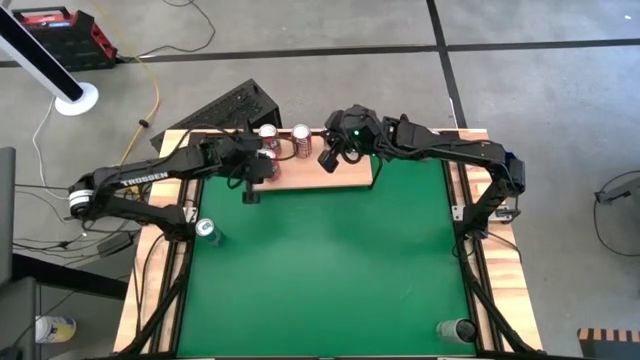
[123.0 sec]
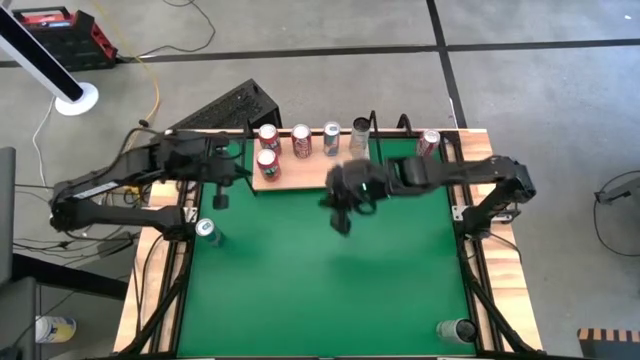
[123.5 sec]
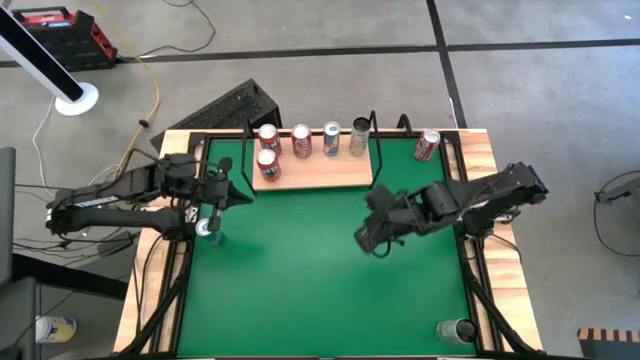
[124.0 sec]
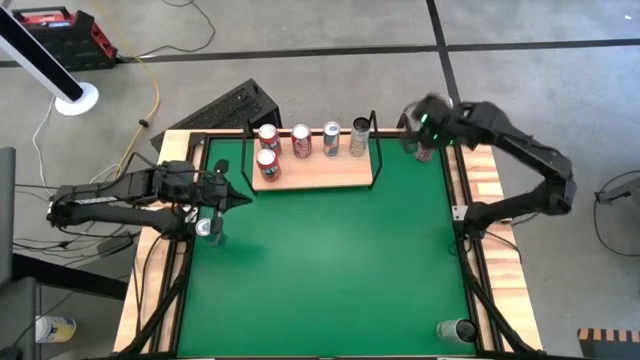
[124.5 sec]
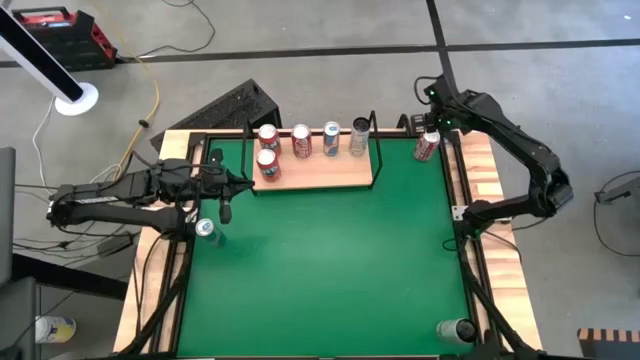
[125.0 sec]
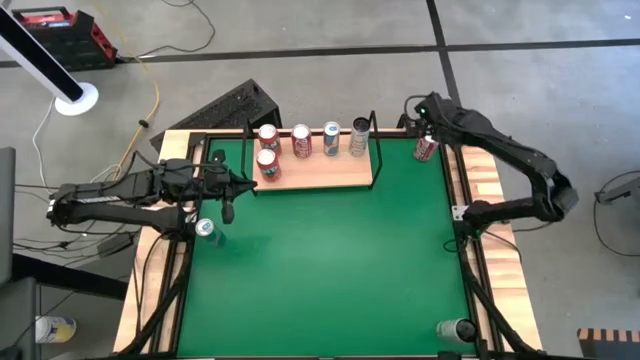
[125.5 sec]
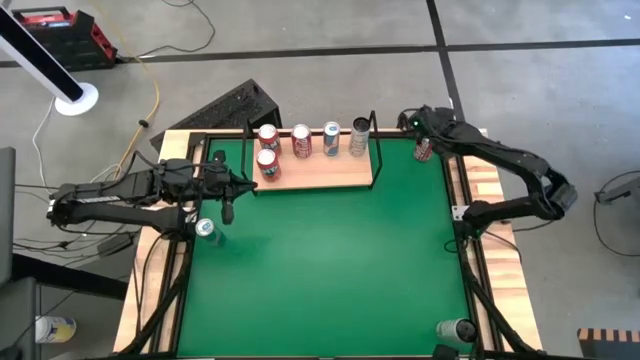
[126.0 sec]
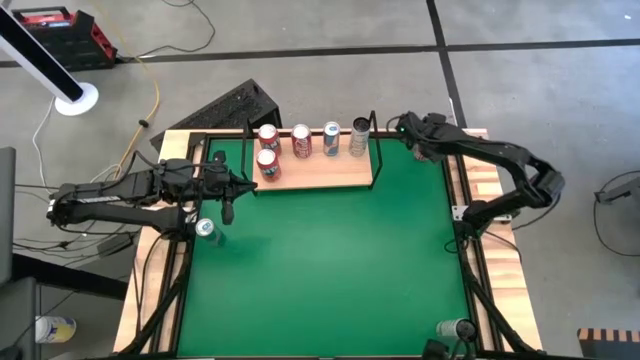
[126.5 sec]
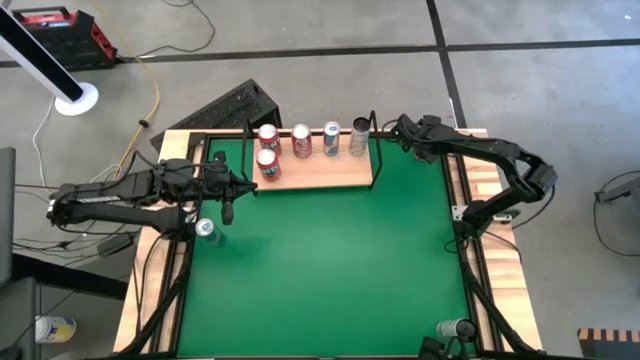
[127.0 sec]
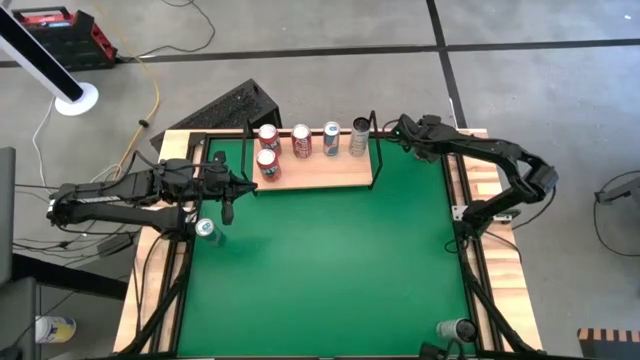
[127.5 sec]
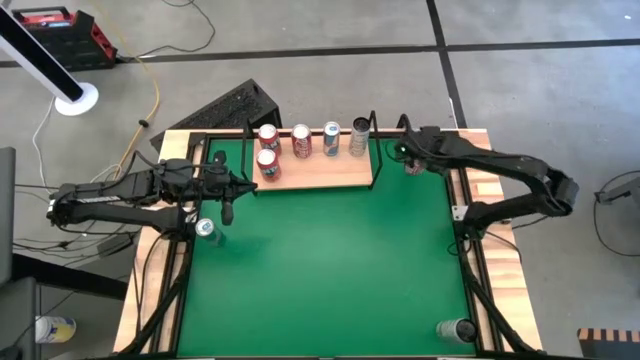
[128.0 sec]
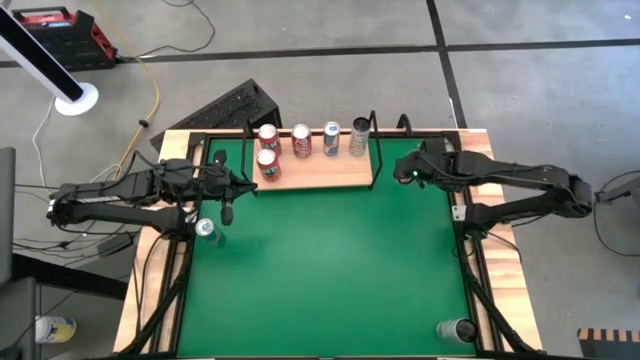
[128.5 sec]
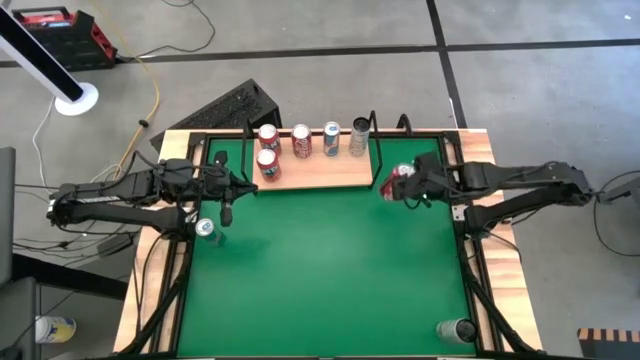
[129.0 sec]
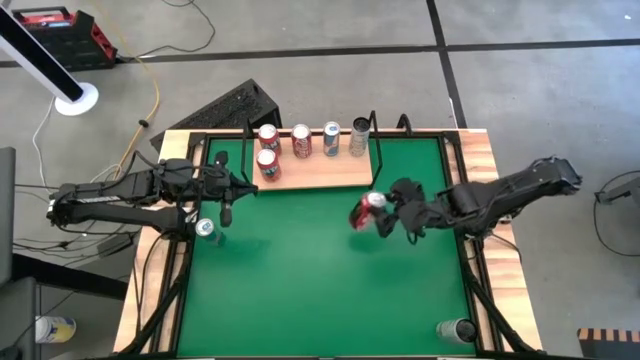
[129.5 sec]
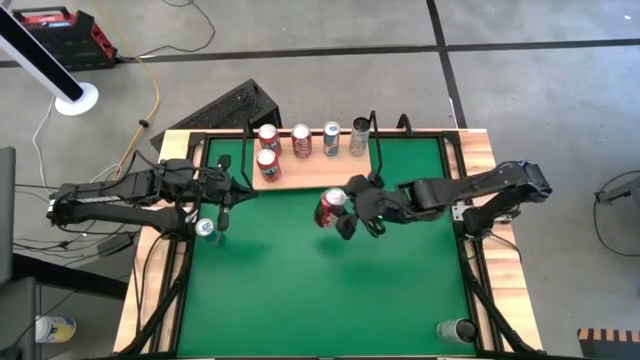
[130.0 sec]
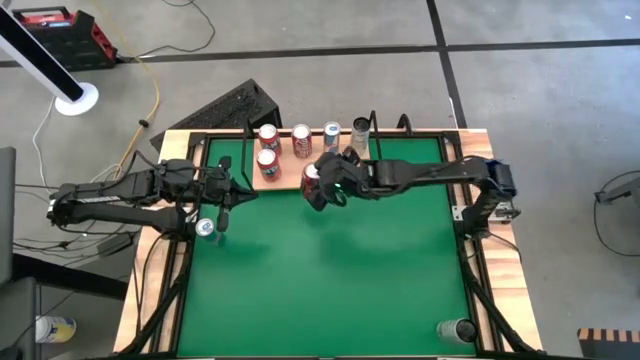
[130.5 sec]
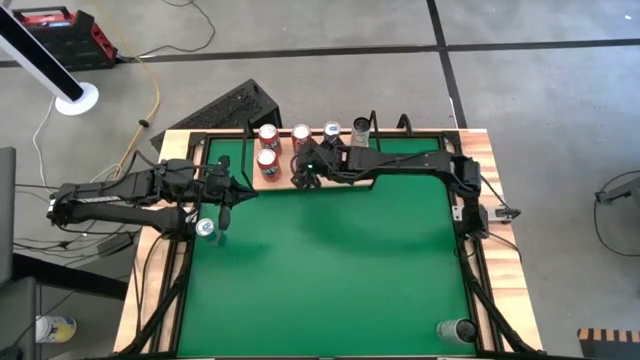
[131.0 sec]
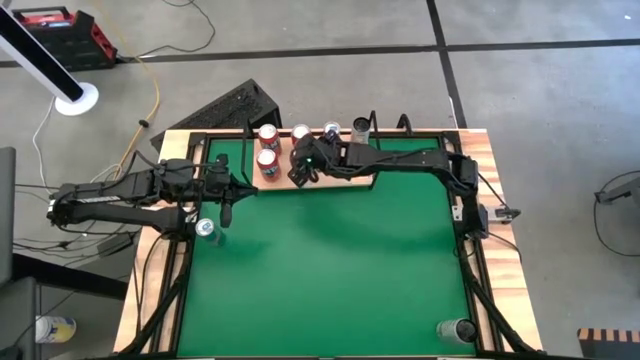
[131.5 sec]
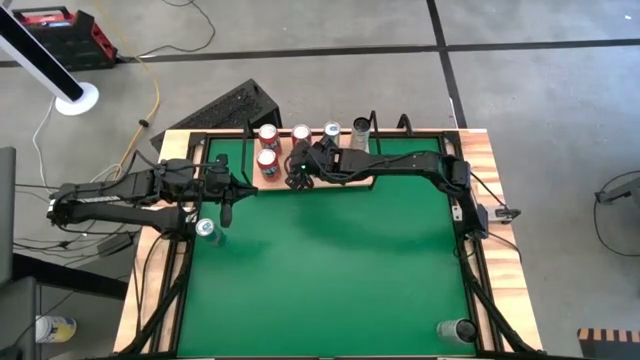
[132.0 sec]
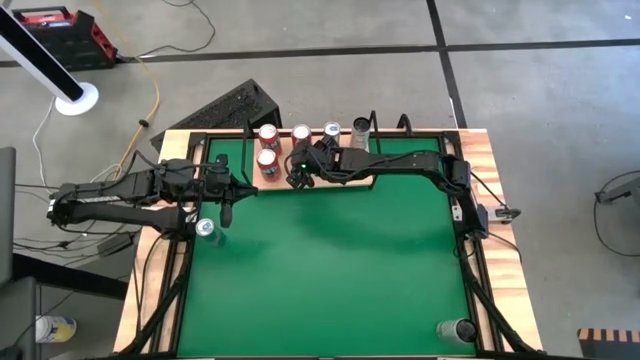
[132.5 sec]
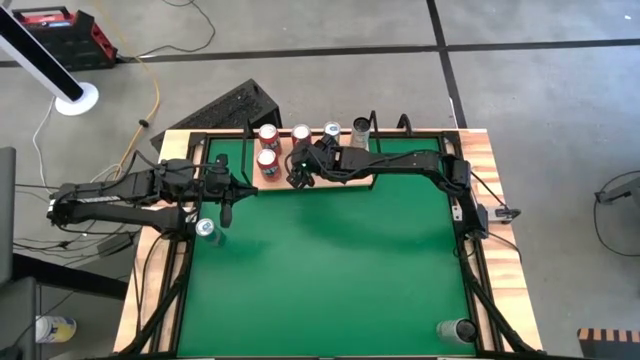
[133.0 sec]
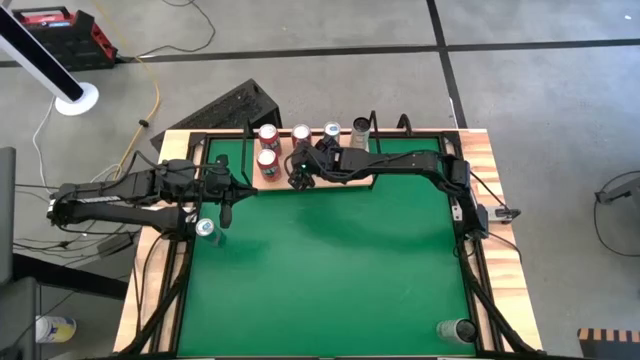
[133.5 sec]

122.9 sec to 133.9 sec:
Task: Place canned beverage on shelf
Put the red soda can, aligned with the other red soda can on the shelf

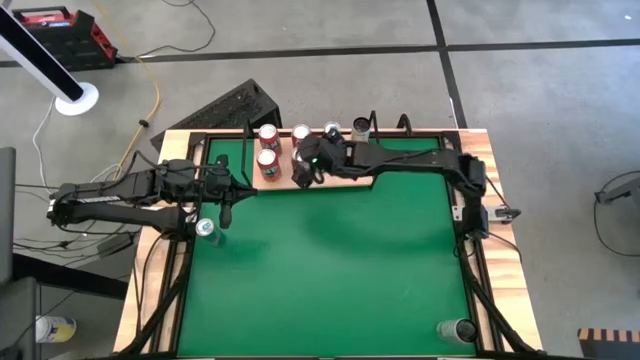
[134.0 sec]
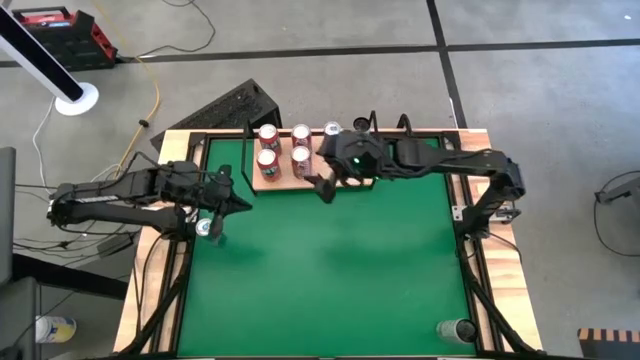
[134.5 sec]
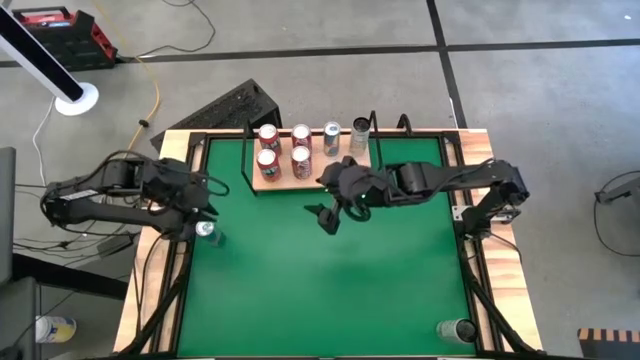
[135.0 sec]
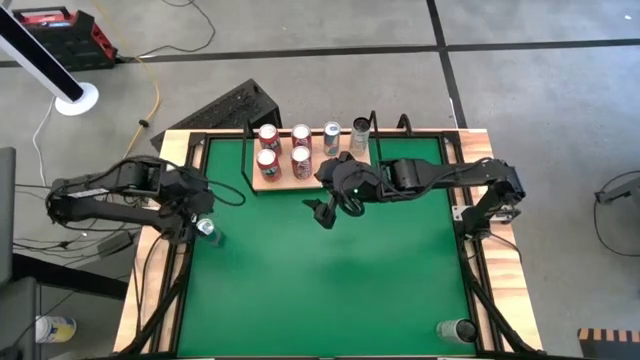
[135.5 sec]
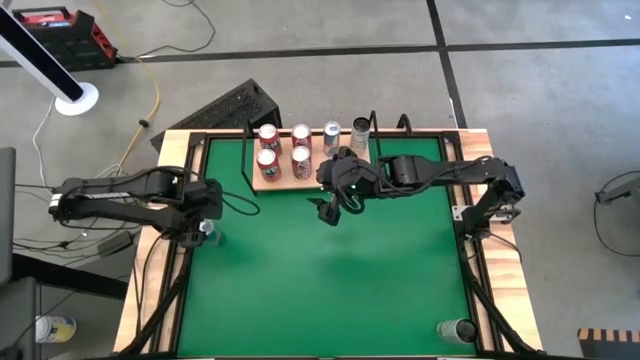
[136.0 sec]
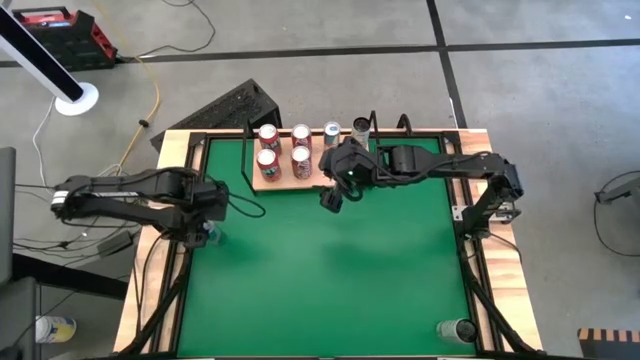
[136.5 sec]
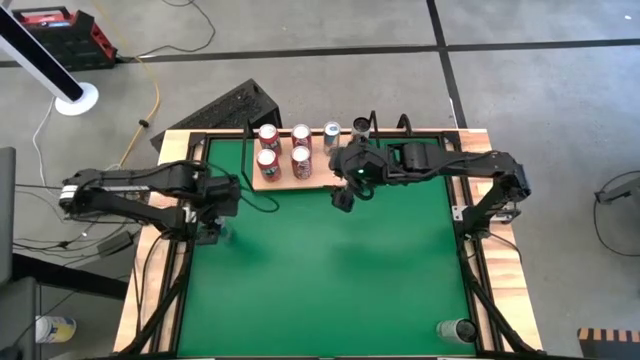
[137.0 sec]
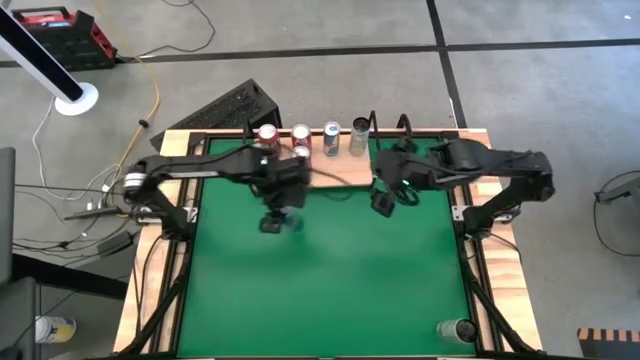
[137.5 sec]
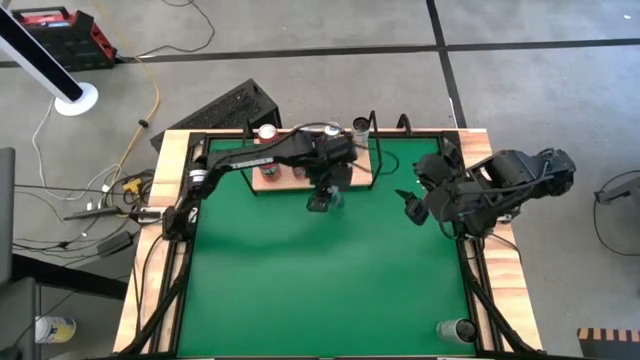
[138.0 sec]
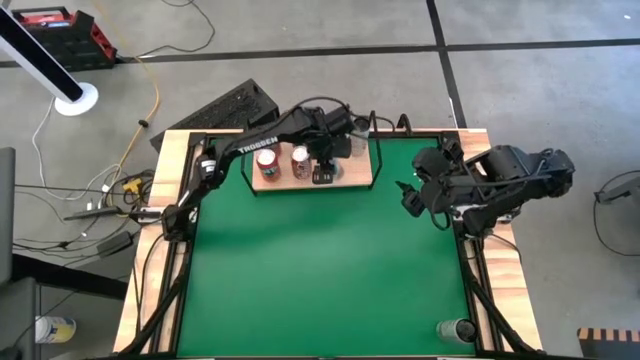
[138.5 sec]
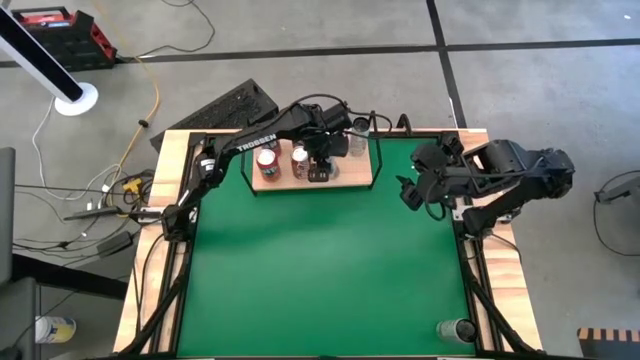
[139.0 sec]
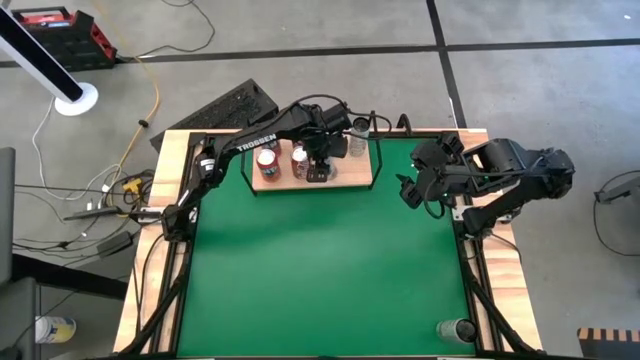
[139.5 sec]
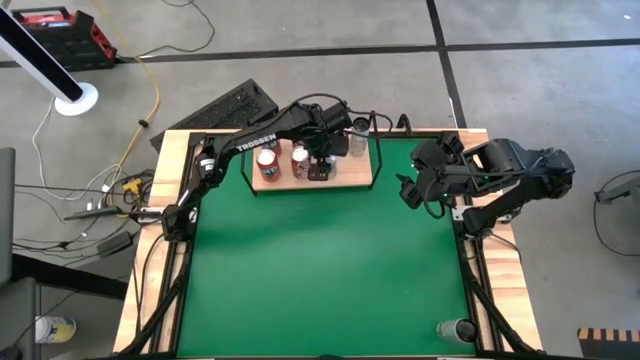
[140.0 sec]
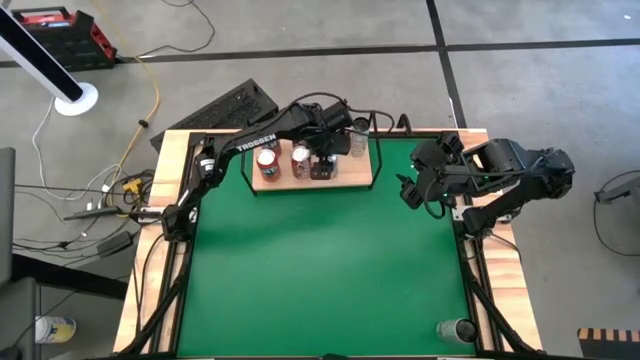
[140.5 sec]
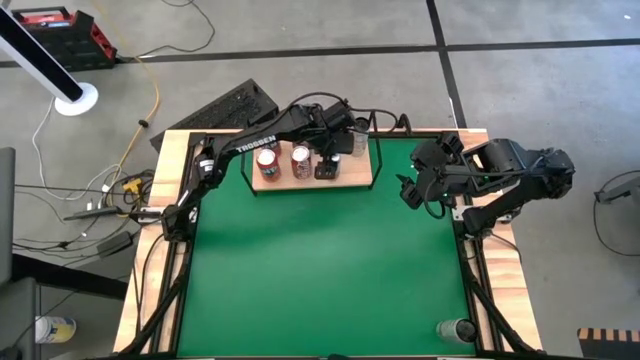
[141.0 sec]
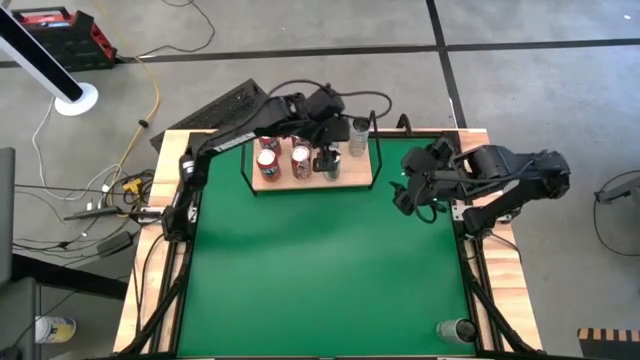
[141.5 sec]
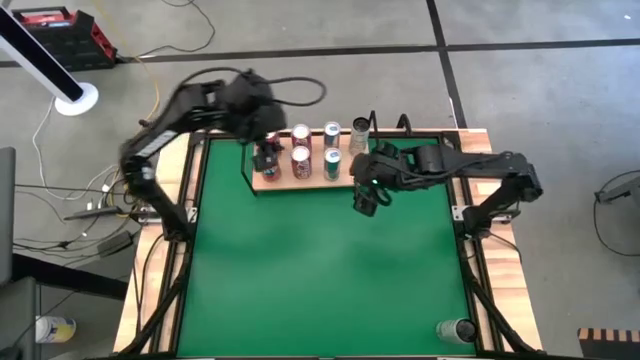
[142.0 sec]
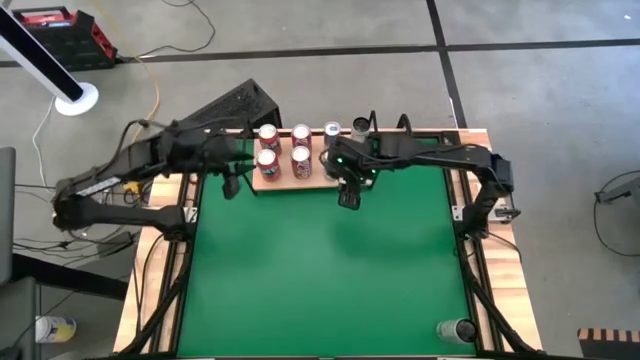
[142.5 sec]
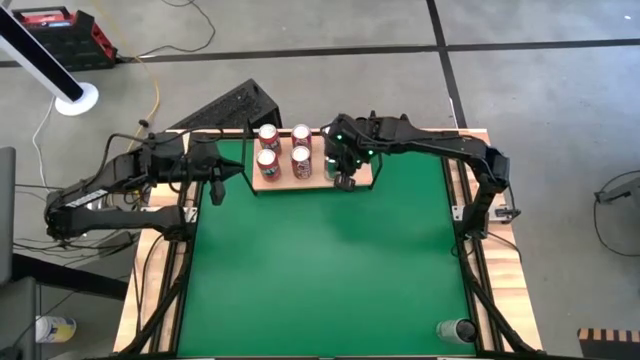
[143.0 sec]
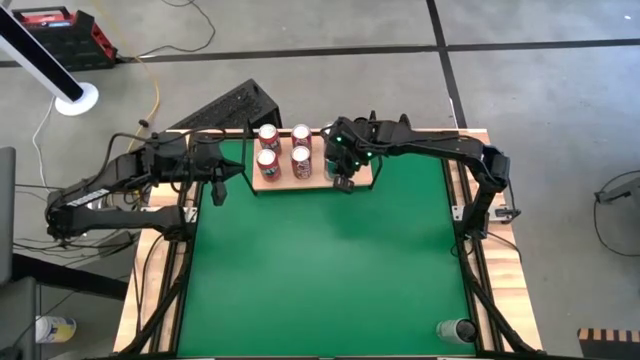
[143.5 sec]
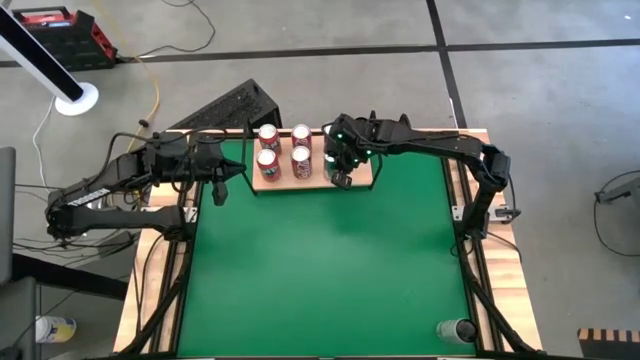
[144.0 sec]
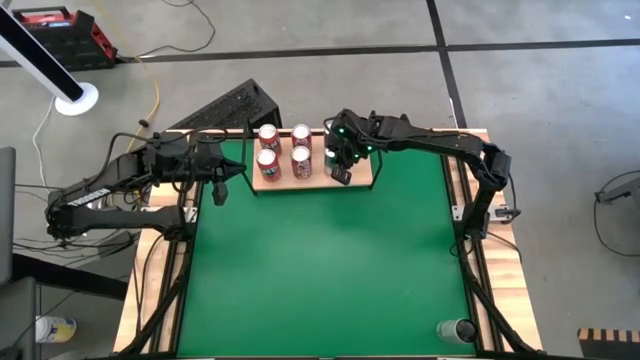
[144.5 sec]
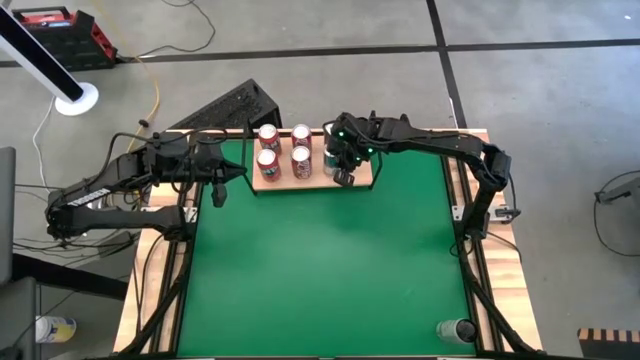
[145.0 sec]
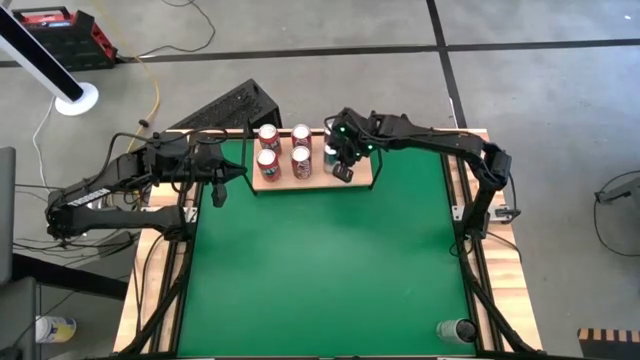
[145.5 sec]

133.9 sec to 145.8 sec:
Put the blue soda can, aligned with the other blue soda can on the shelf
